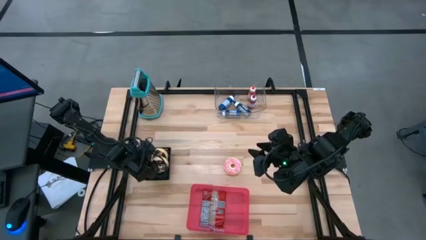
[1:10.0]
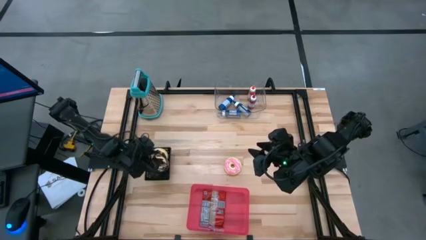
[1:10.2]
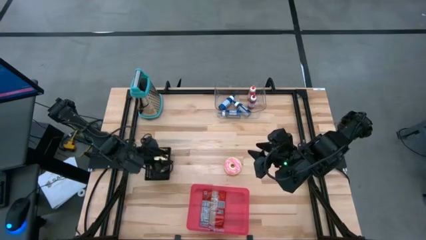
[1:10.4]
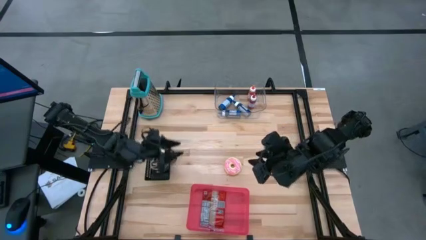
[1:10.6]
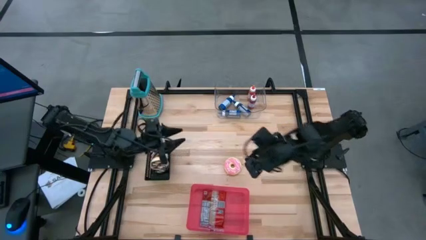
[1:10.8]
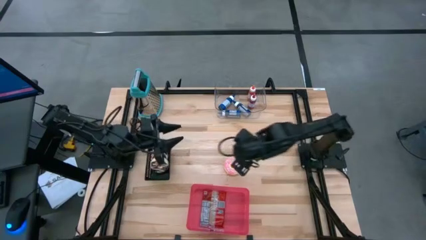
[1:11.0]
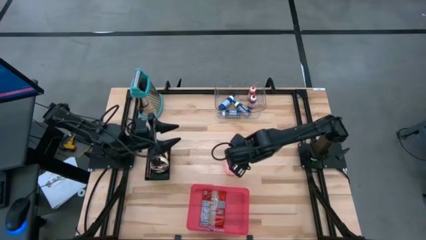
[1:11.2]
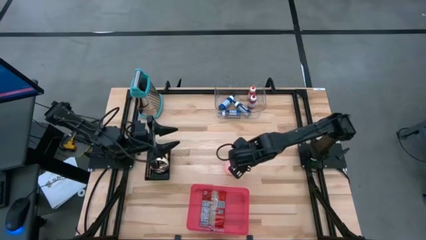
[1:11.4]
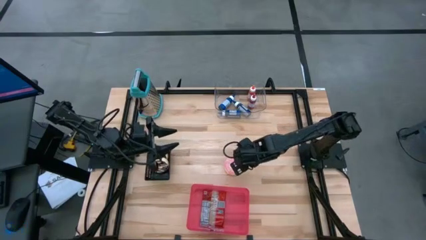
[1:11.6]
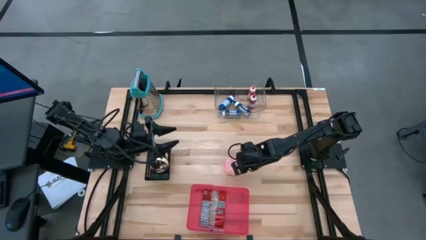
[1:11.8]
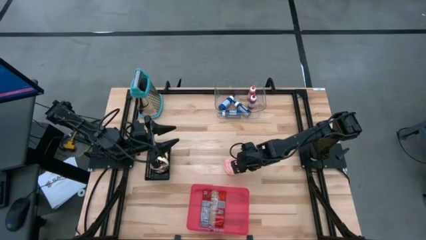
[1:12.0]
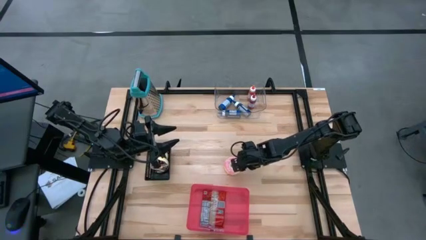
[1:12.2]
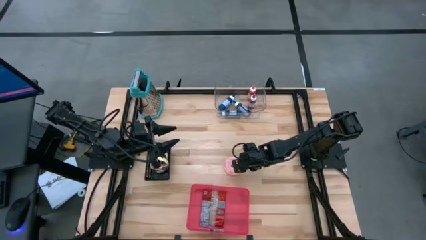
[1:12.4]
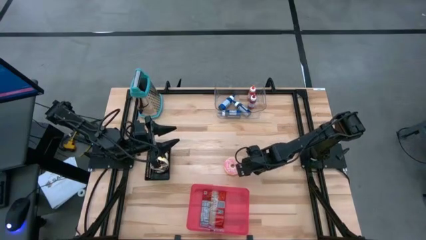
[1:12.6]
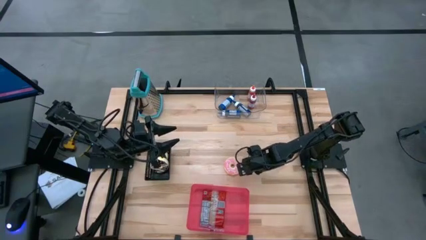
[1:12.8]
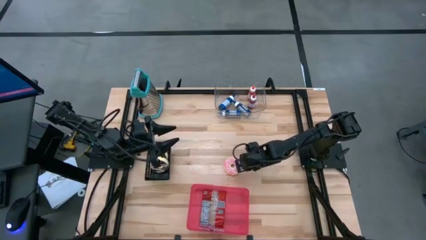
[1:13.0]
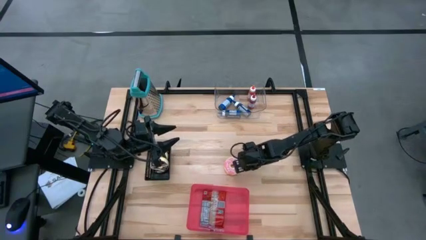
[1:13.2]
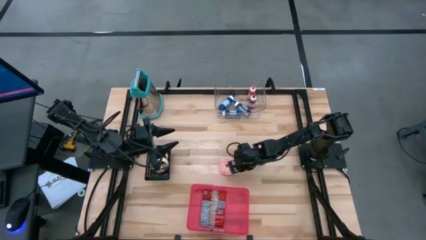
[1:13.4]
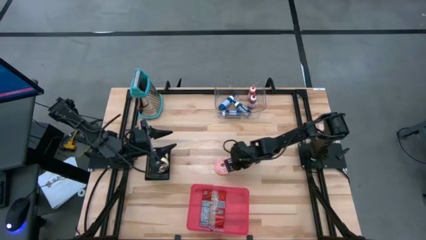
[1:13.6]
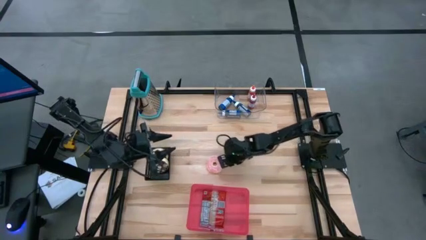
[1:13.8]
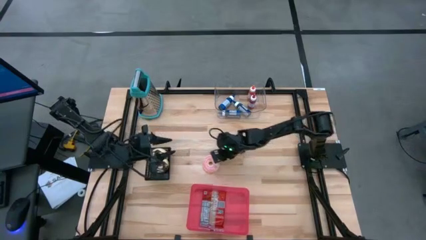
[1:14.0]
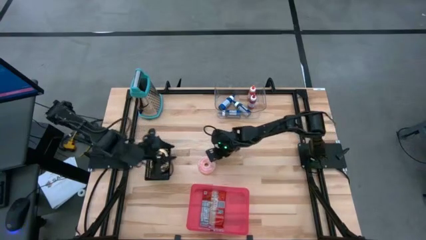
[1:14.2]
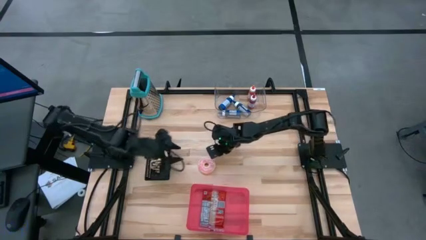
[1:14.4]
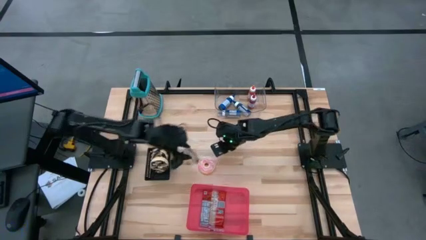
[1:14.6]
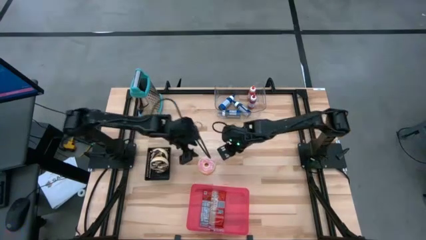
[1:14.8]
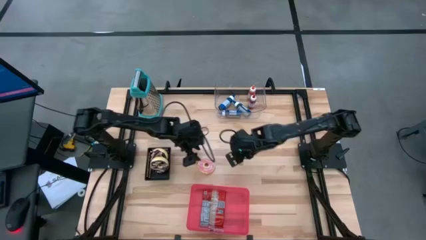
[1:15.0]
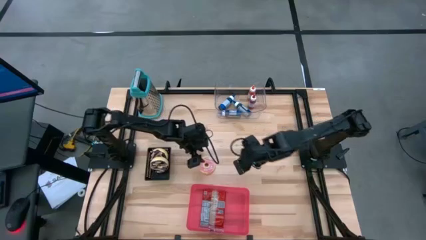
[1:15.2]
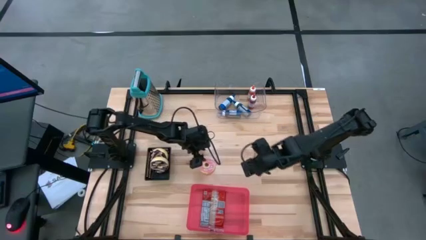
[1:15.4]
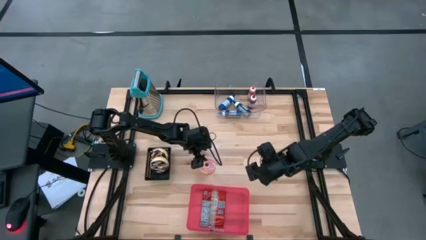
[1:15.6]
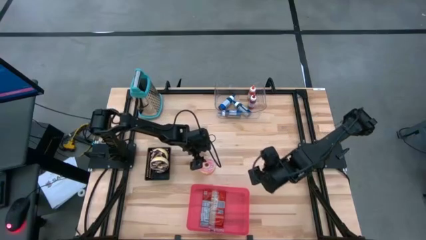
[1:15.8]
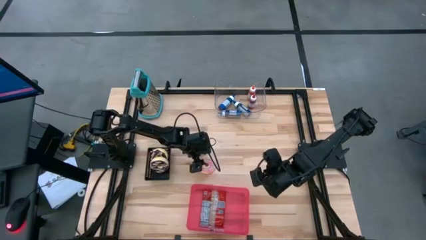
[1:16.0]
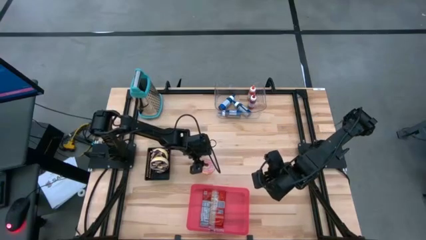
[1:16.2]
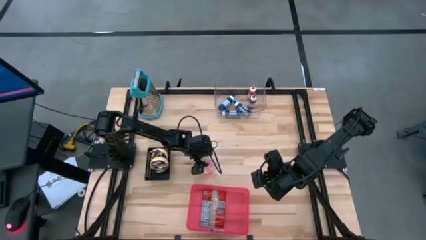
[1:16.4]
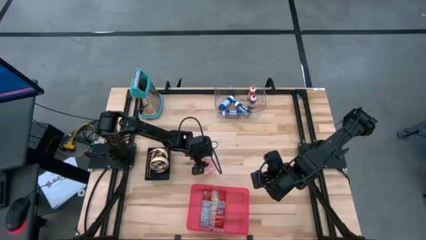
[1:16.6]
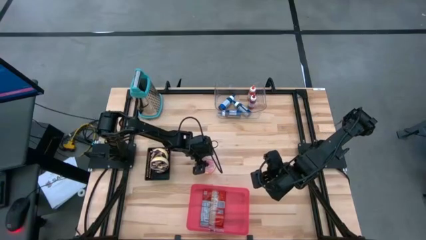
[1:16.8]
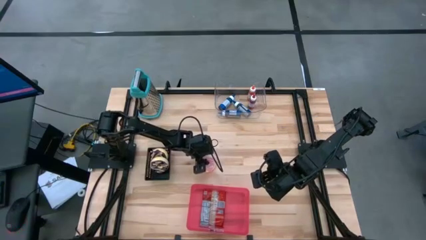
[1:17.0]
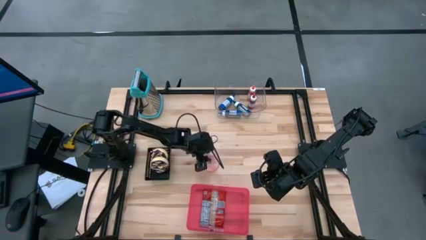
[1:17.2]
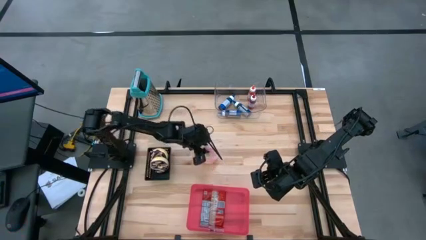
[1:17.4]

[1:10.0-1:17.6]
Put the pink donut into the black bin

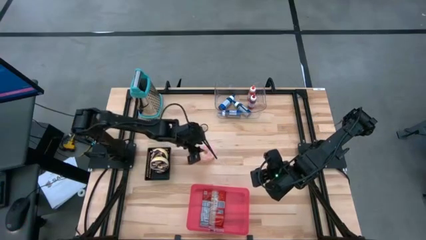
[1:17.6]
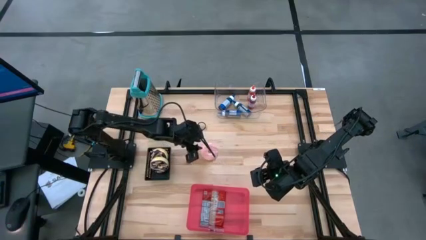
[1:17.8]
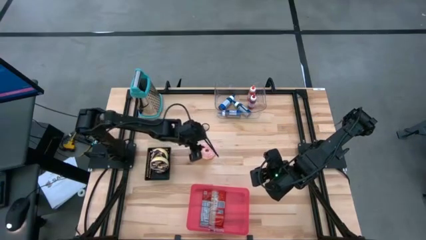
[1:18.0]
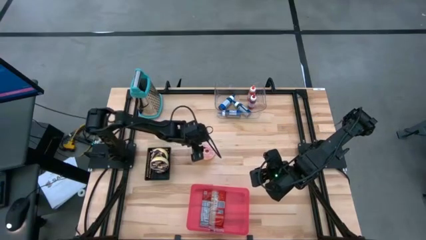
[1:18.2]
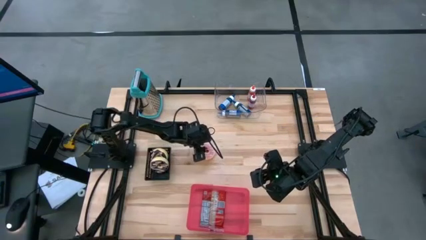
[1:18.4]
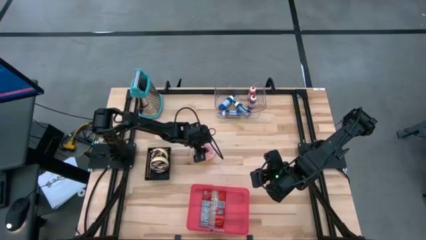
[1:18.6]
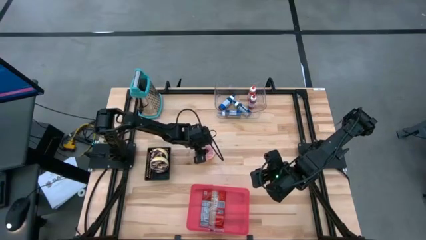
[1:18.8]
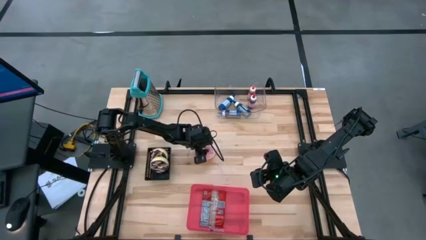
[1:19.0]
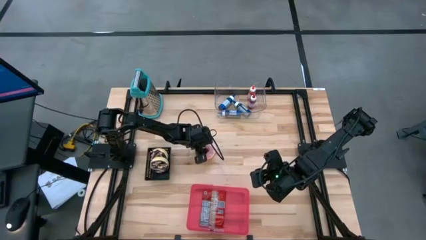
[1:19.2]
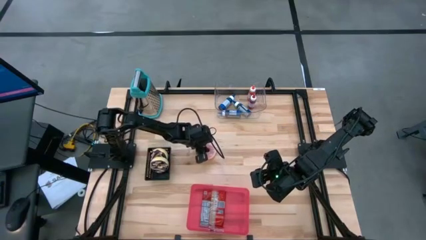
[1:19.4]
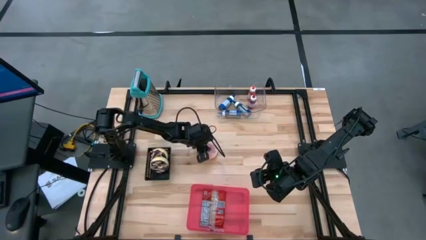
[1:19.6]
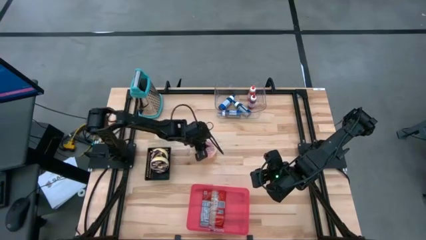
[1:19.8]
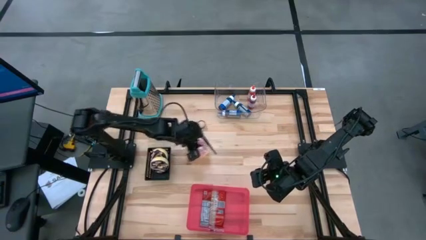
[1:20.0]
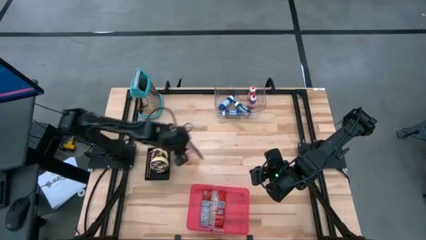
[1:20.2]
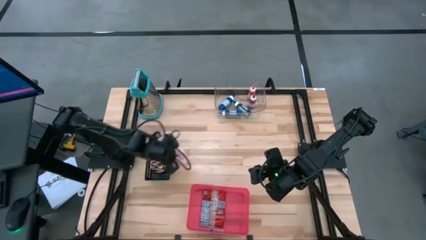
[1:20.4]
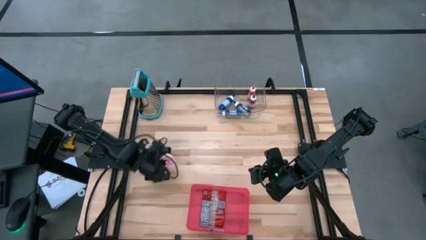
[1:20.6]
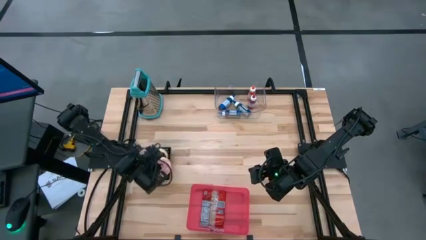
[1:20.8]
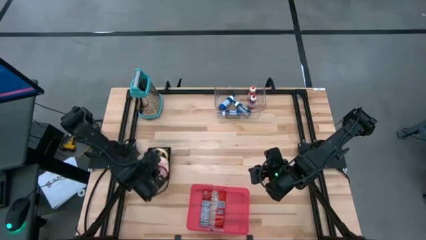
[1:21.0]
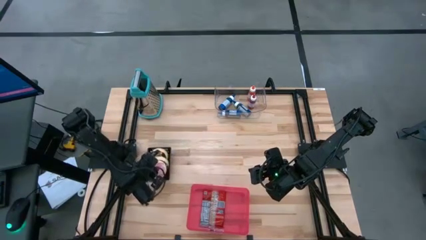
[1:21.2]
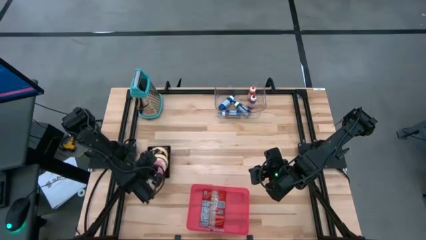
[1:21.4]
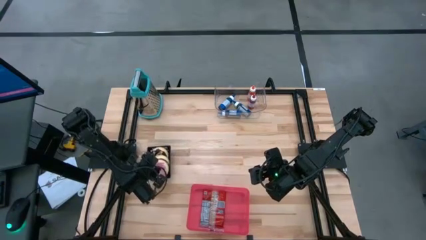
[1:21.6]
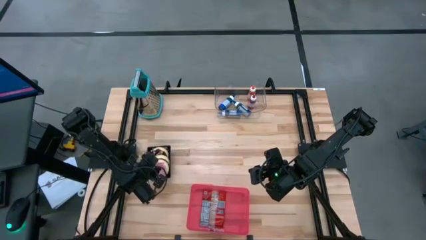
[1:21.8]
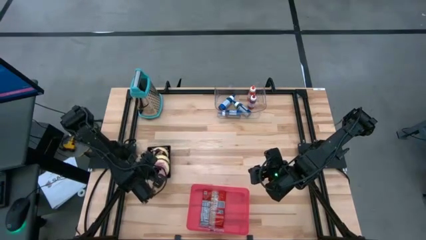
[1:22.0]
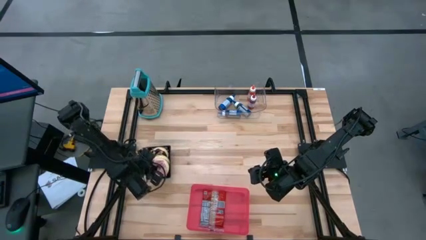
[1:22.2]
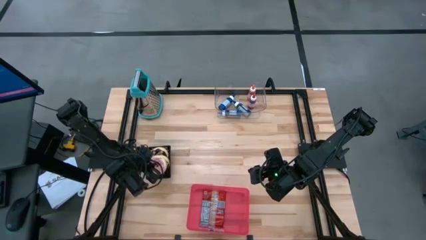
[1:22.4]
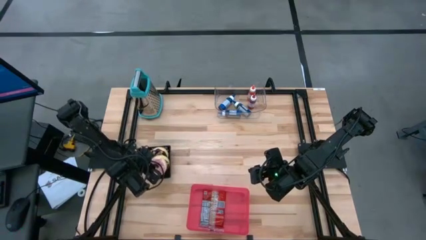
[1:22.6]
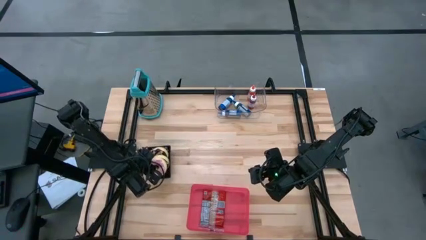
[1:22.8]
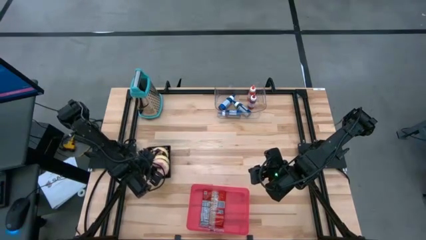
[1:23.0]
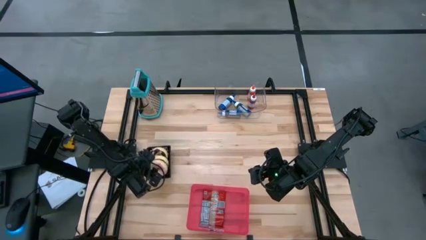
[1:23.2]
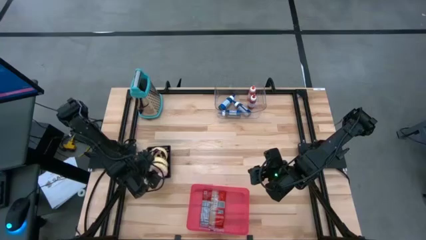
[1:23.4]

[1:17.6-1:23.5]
Put the pink donut into the black bin
